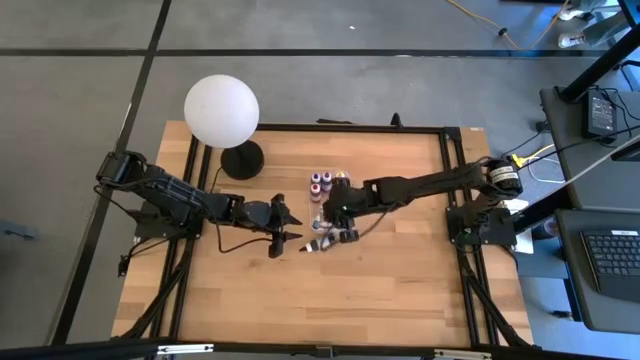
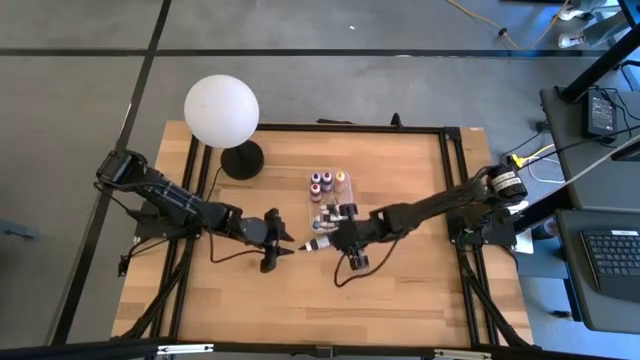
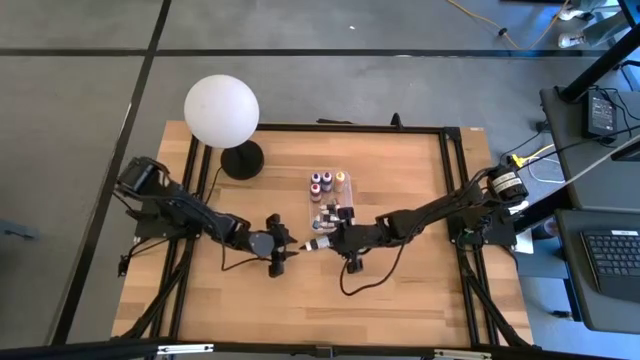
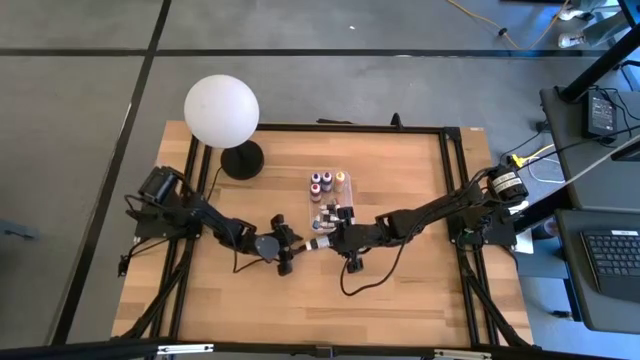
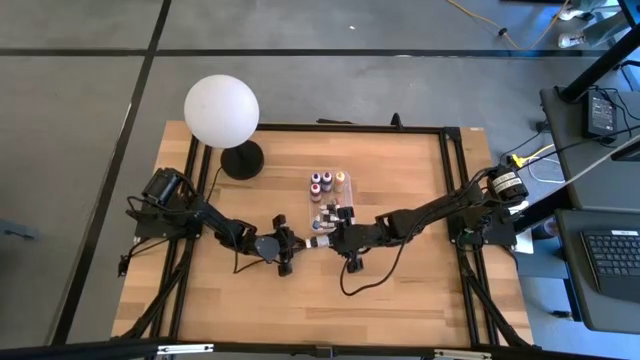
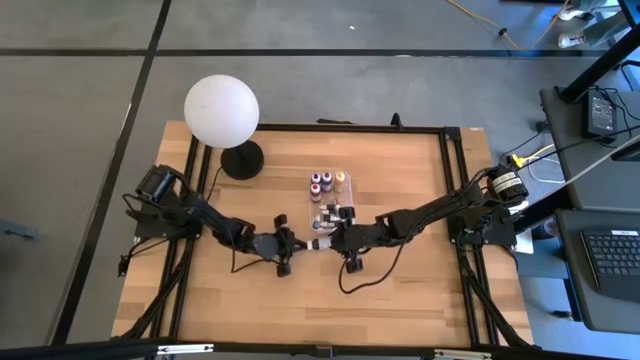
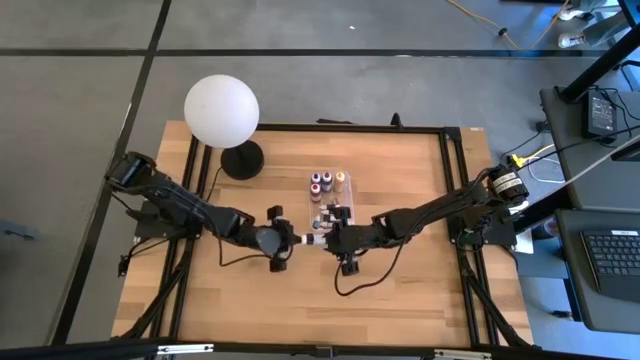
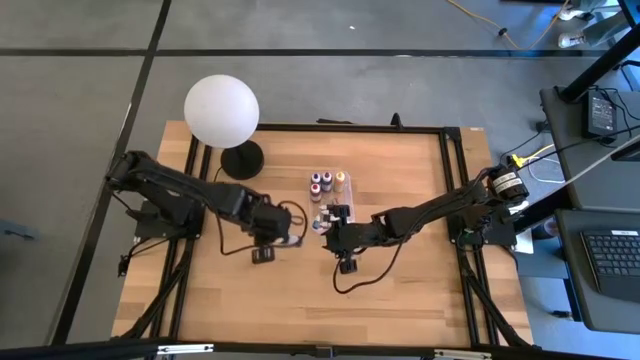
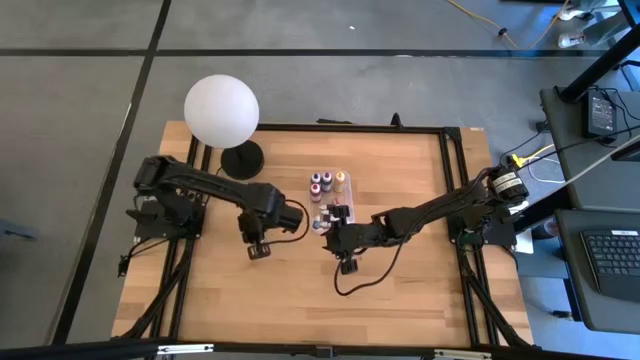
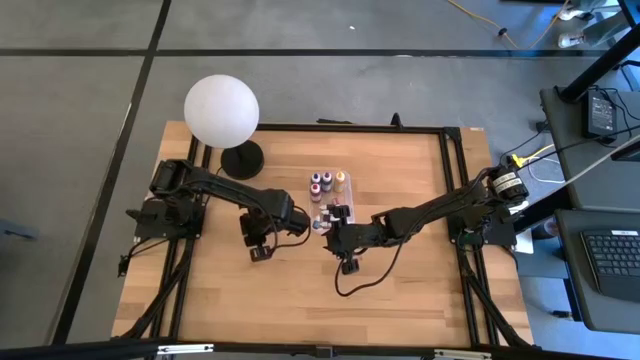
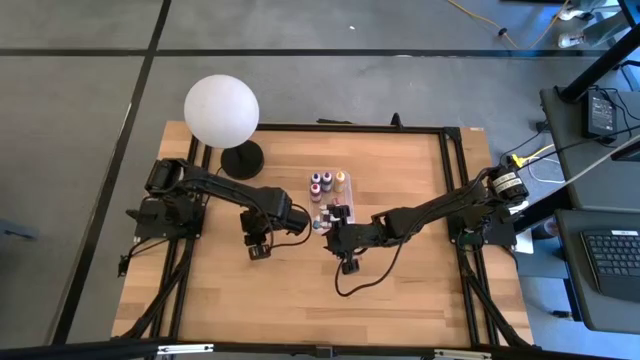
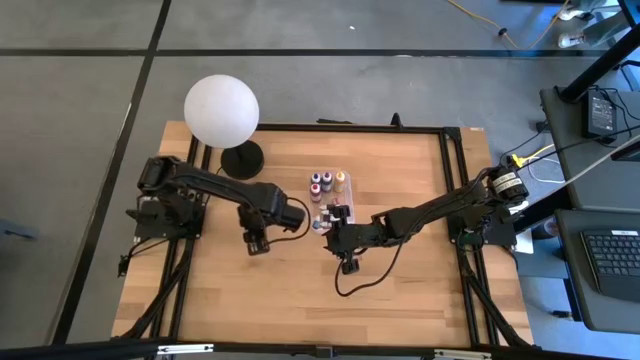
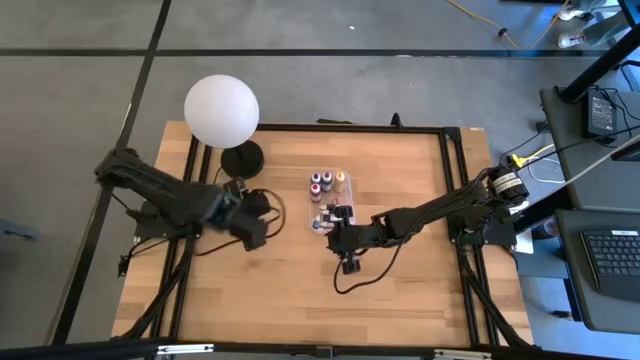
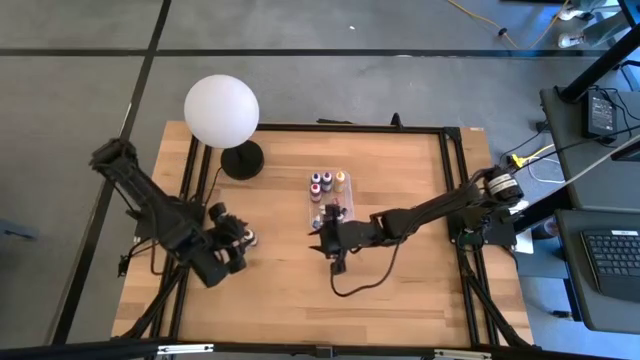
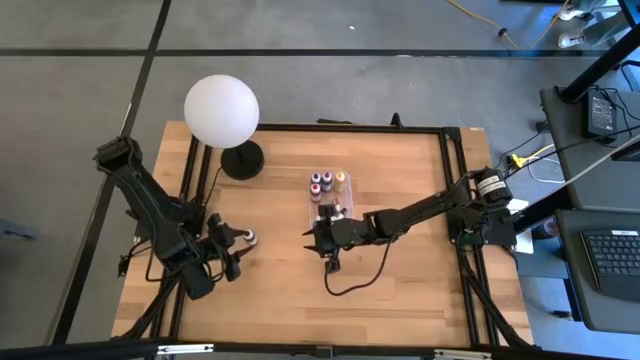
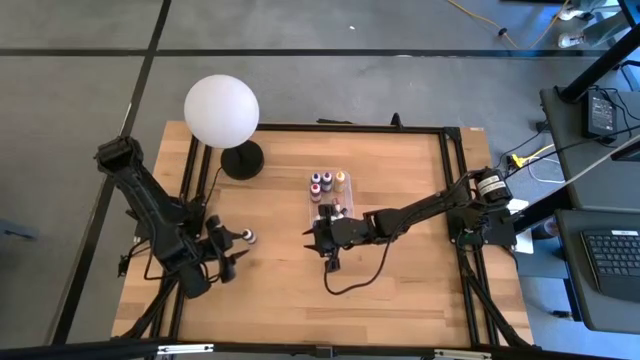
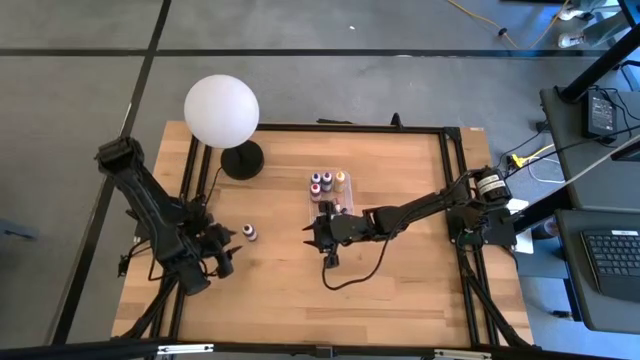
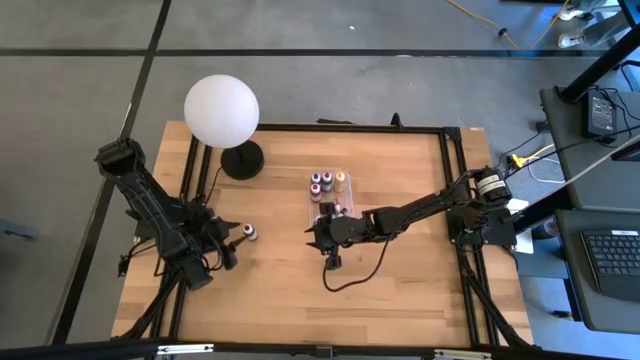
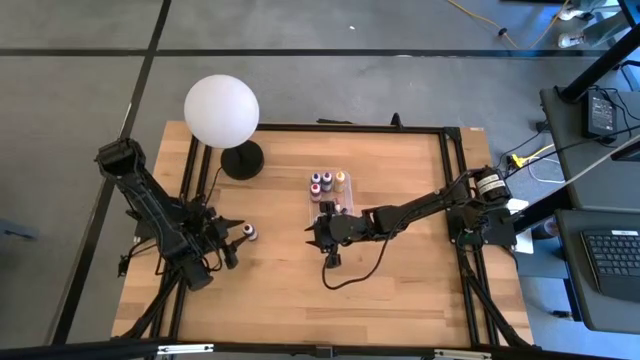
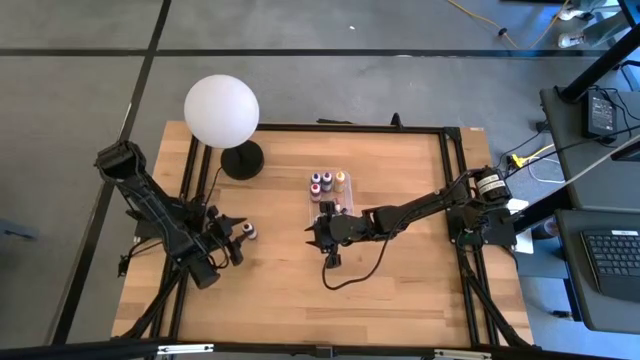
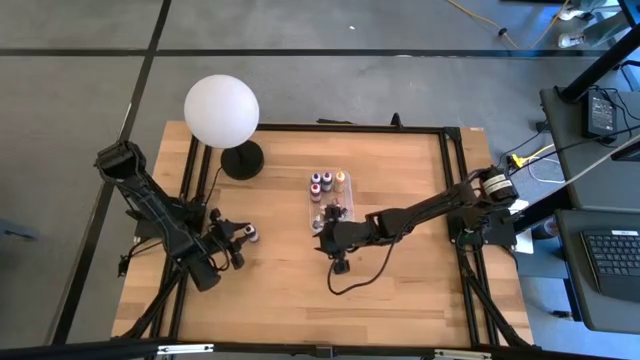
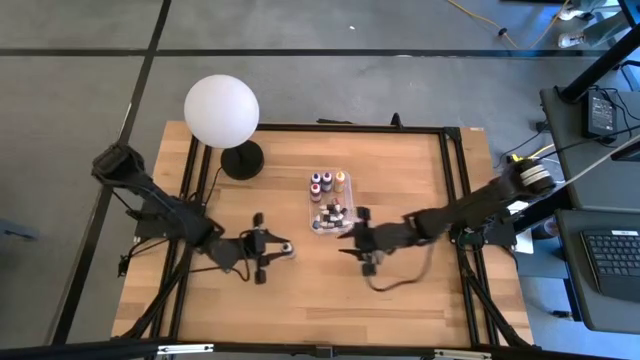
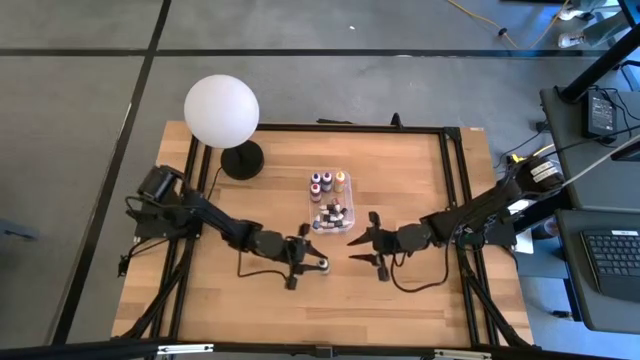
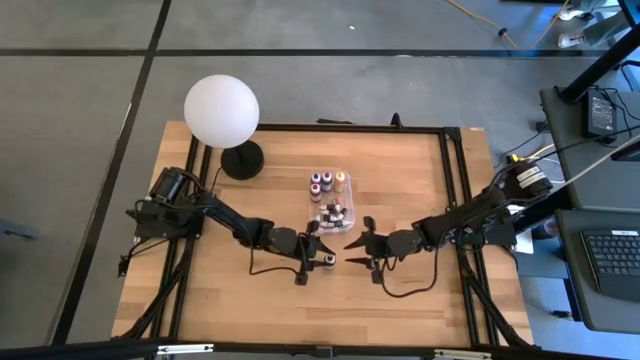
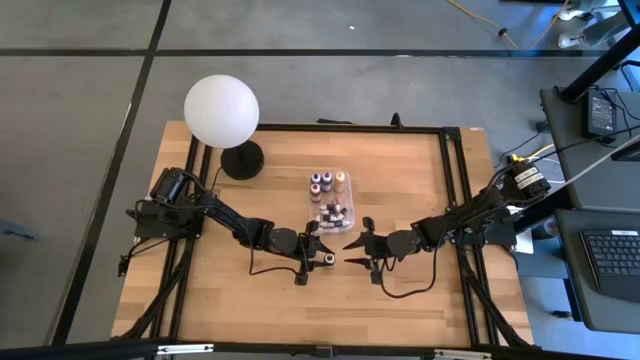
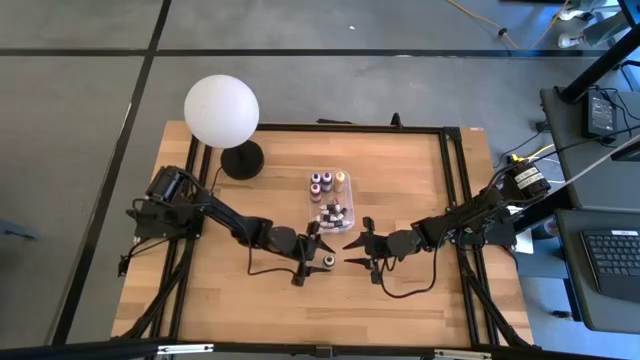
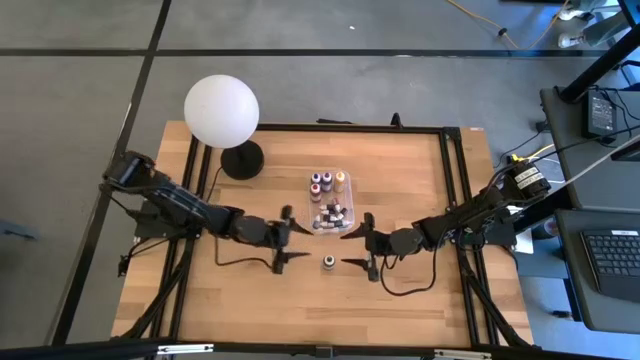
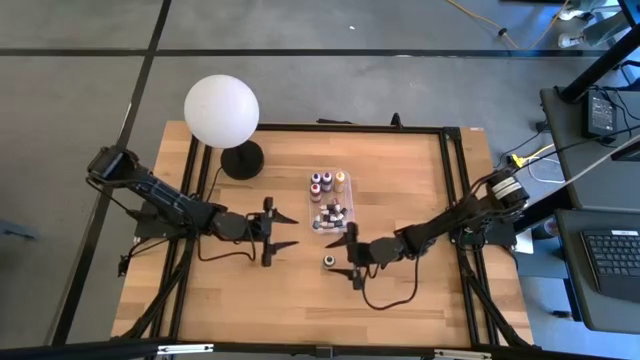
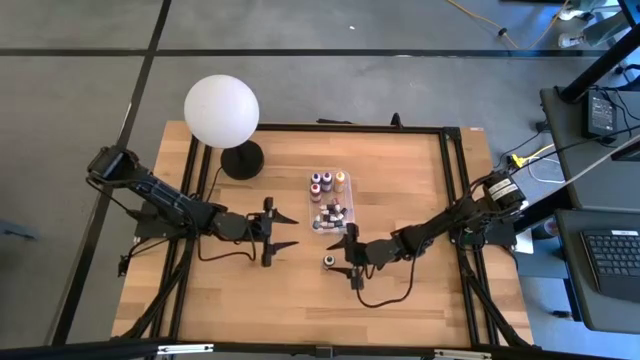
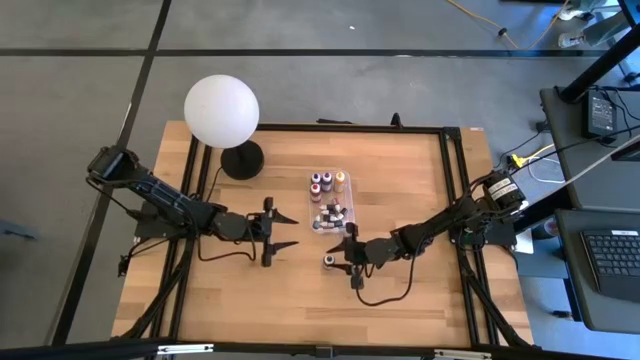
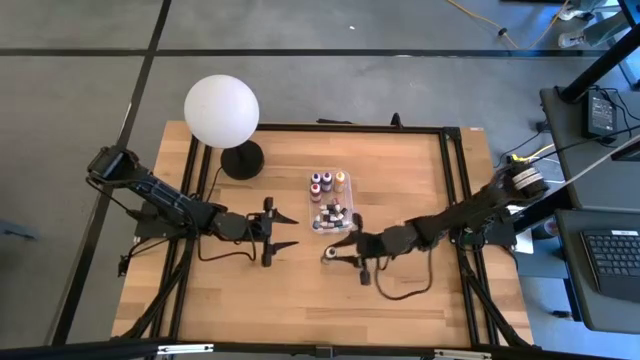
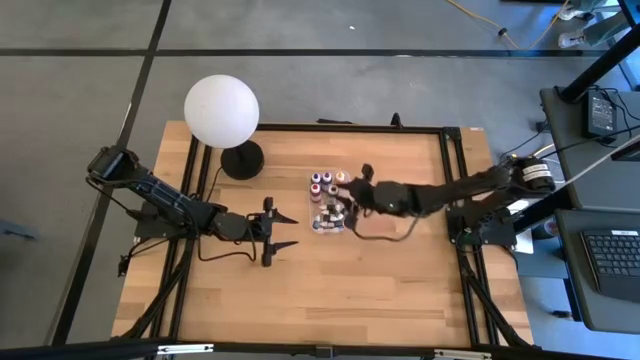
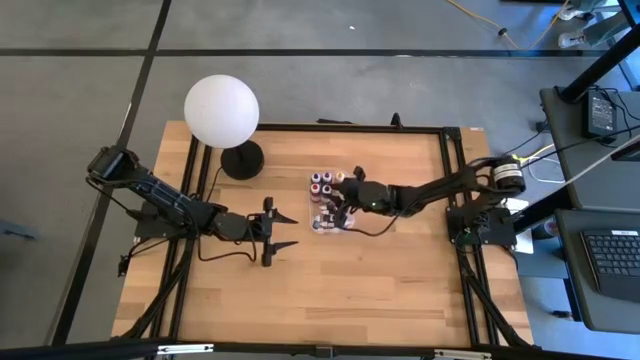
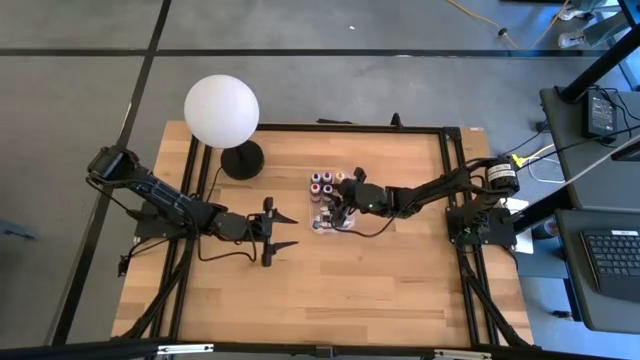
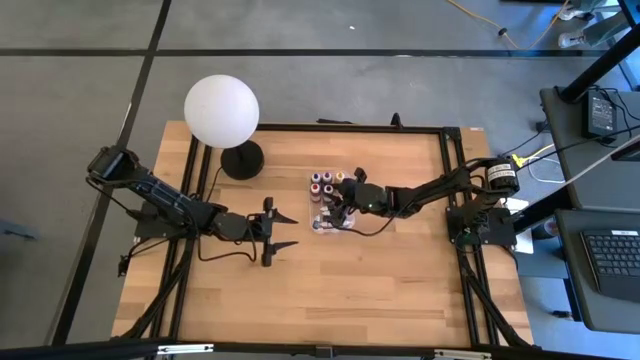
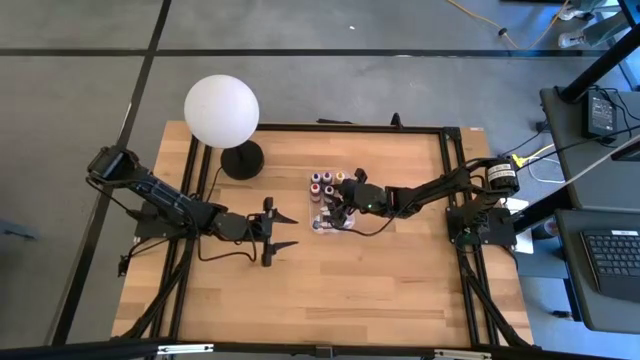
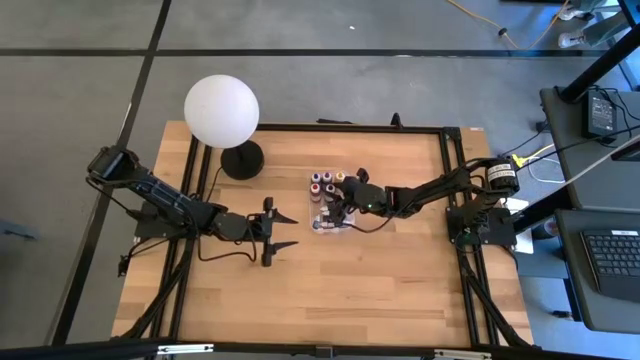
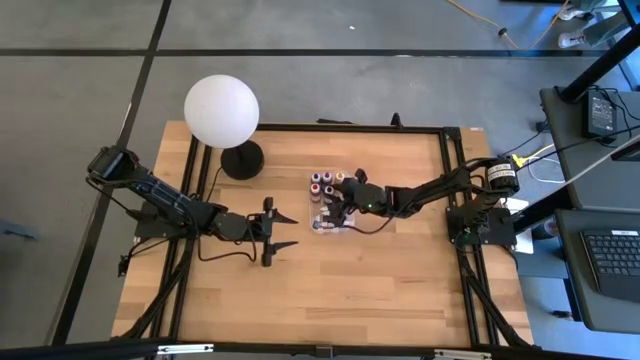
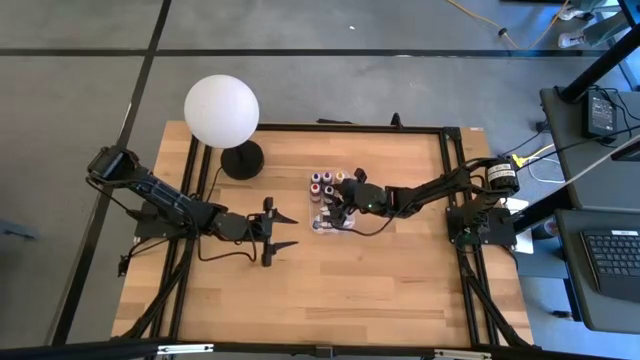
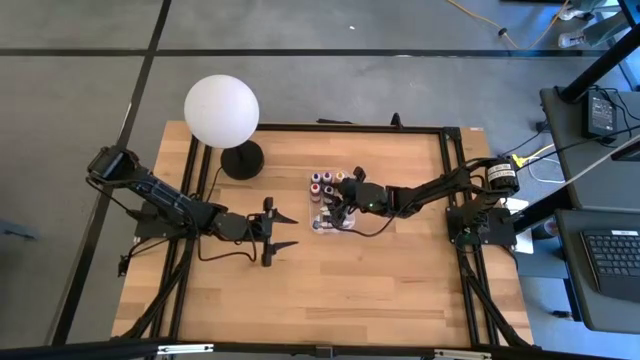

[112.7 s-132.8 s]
Task: Pick & Place food coloring
Put the large black food coloring bottle in the transparent bin
